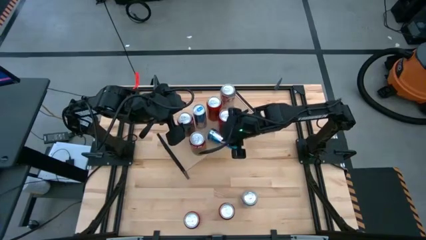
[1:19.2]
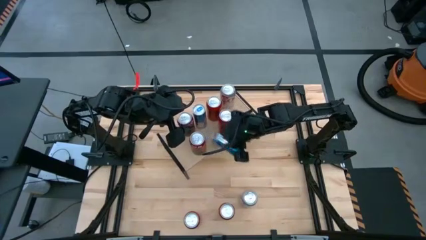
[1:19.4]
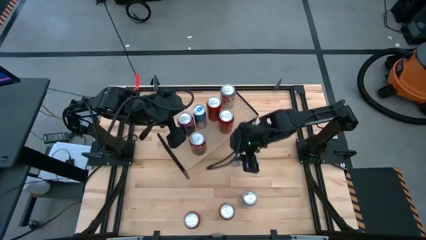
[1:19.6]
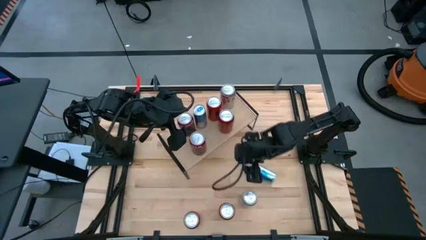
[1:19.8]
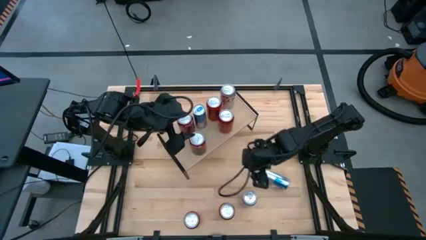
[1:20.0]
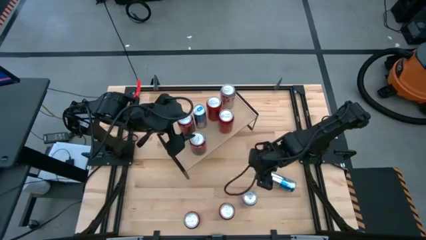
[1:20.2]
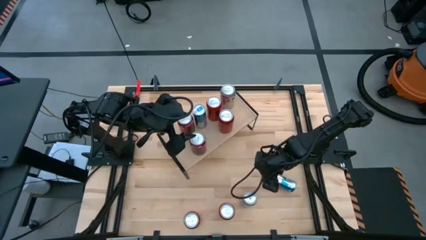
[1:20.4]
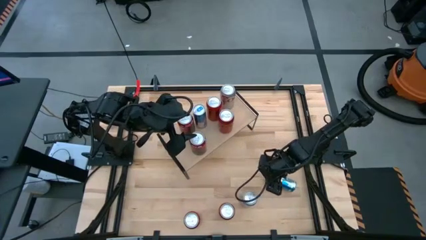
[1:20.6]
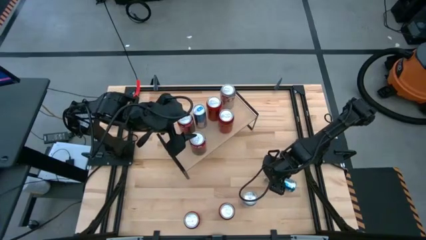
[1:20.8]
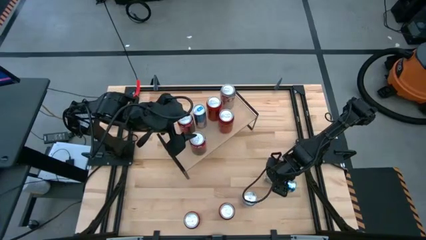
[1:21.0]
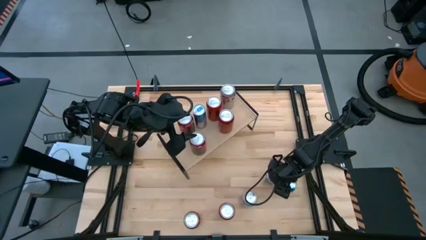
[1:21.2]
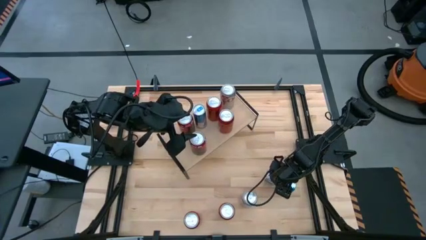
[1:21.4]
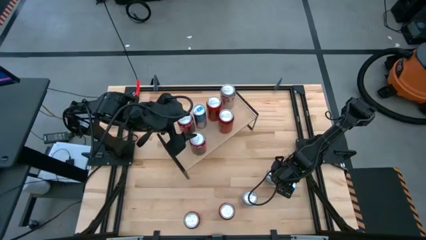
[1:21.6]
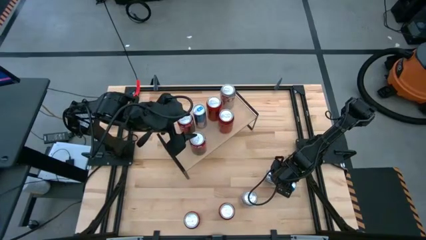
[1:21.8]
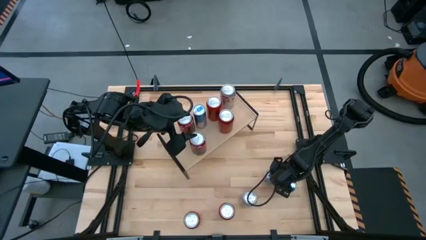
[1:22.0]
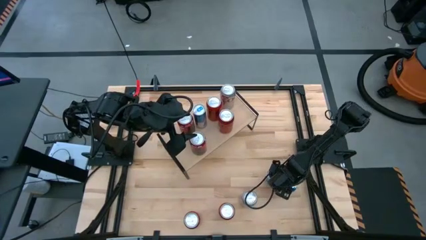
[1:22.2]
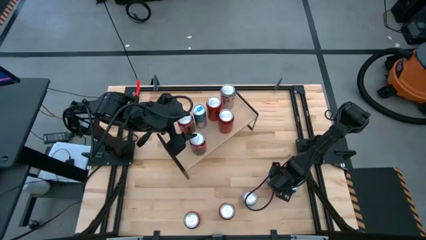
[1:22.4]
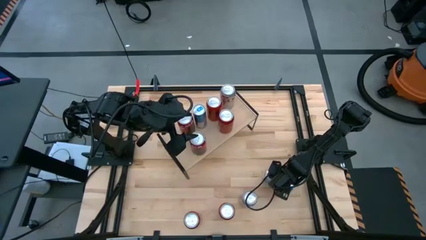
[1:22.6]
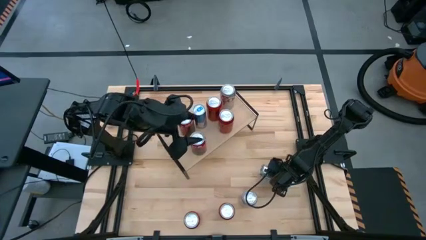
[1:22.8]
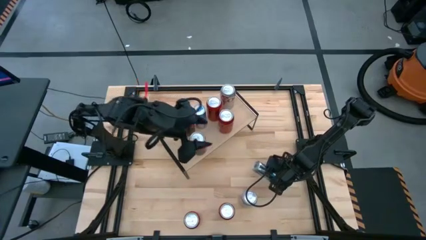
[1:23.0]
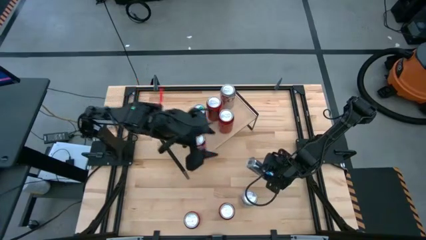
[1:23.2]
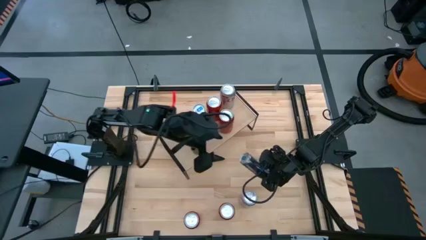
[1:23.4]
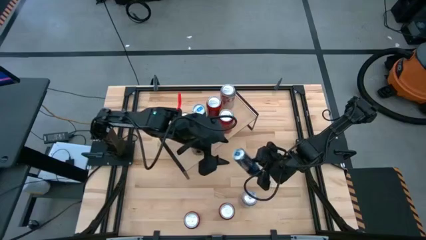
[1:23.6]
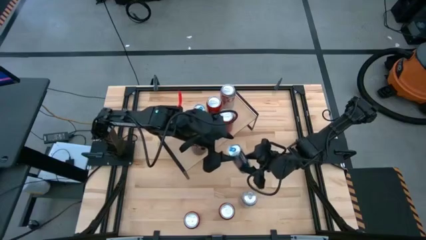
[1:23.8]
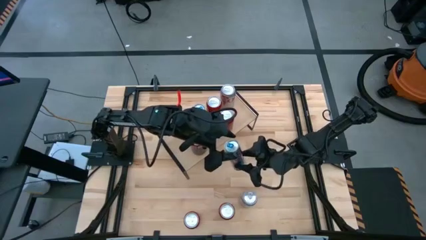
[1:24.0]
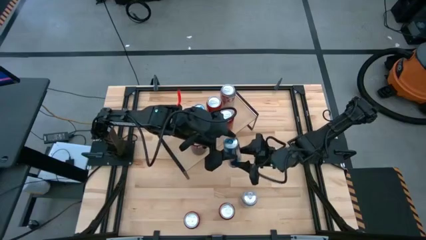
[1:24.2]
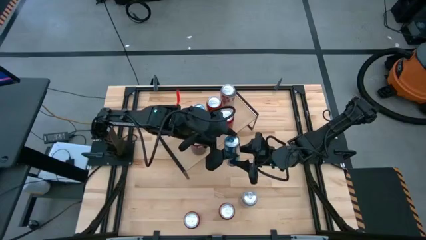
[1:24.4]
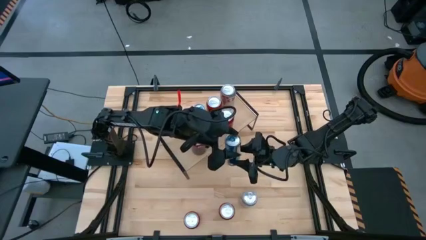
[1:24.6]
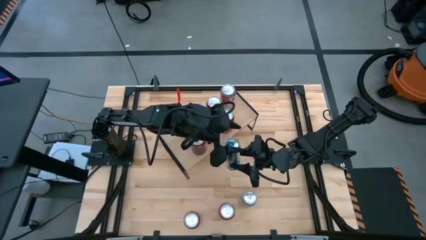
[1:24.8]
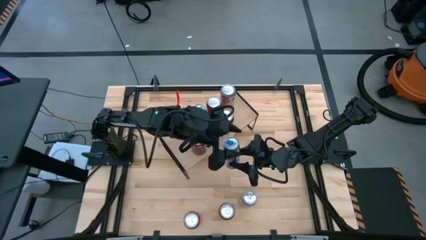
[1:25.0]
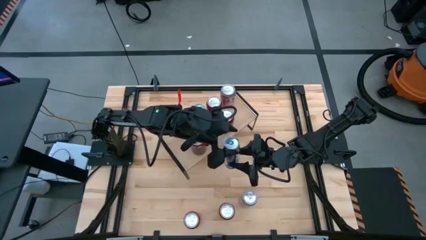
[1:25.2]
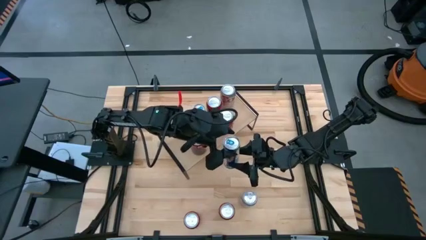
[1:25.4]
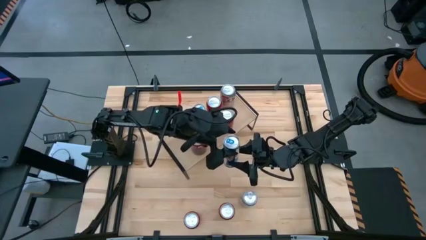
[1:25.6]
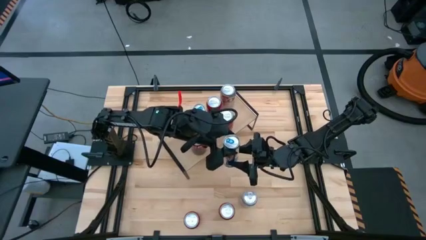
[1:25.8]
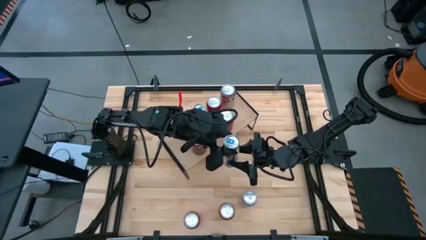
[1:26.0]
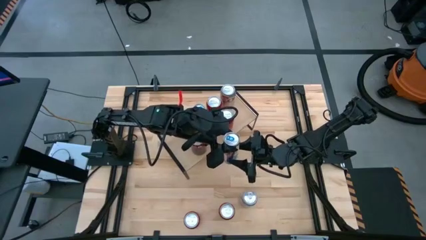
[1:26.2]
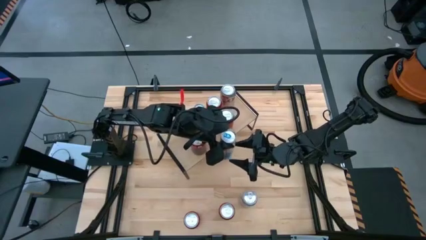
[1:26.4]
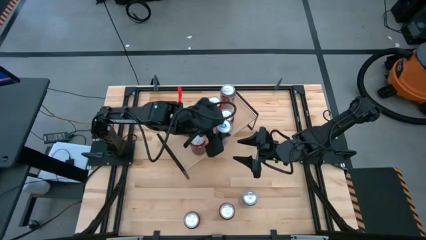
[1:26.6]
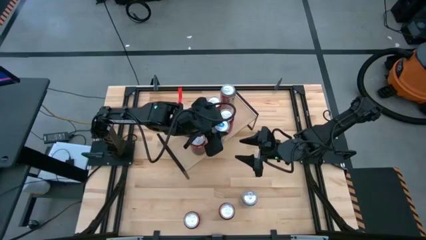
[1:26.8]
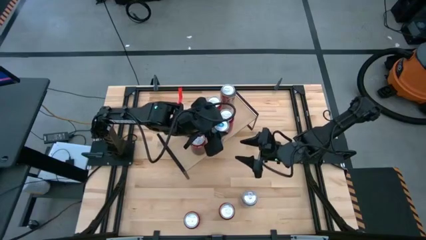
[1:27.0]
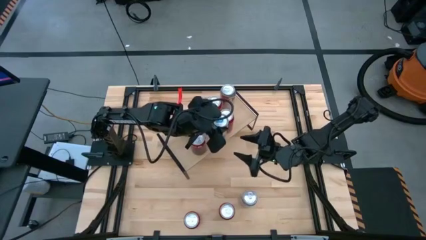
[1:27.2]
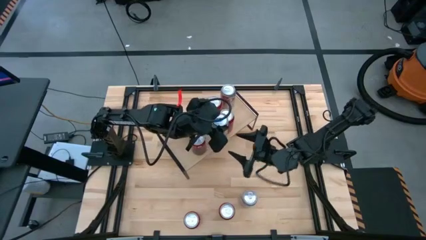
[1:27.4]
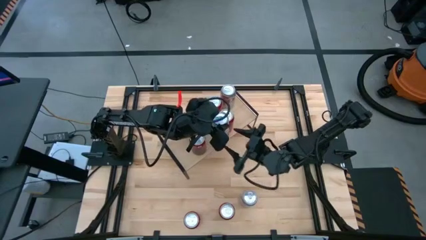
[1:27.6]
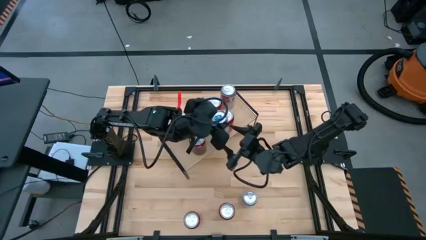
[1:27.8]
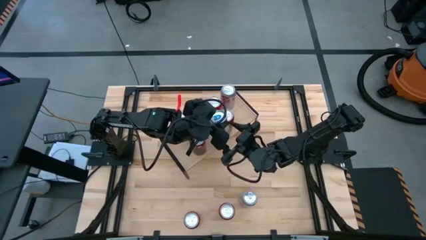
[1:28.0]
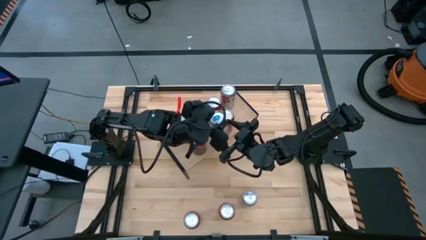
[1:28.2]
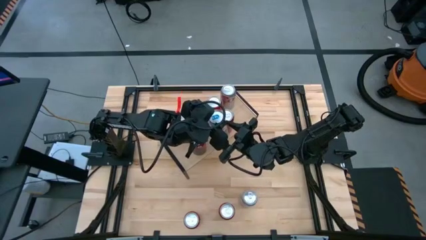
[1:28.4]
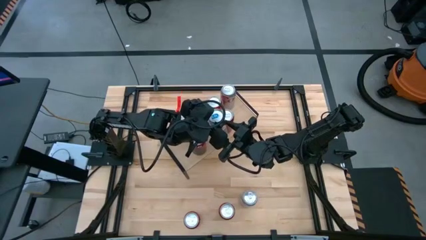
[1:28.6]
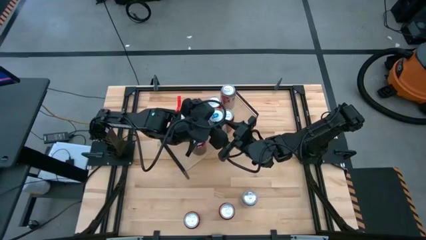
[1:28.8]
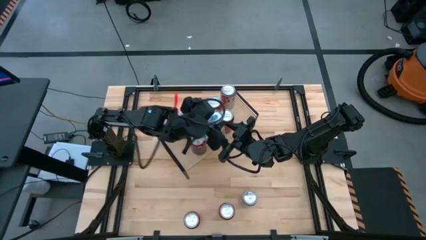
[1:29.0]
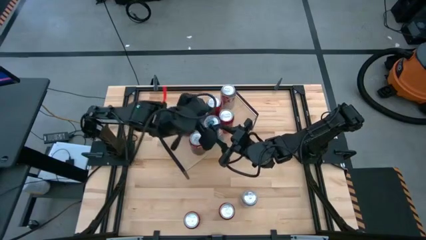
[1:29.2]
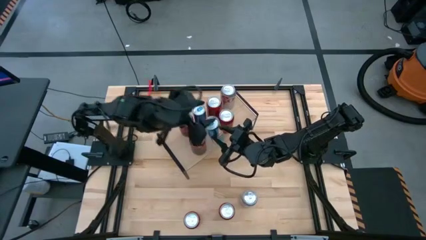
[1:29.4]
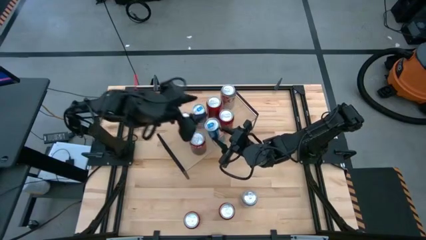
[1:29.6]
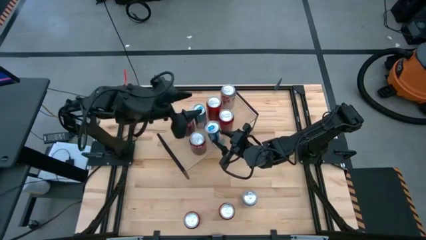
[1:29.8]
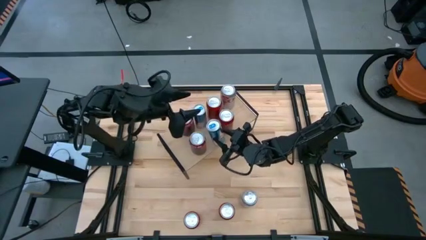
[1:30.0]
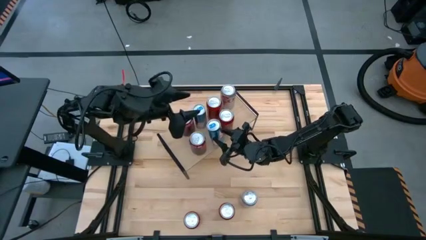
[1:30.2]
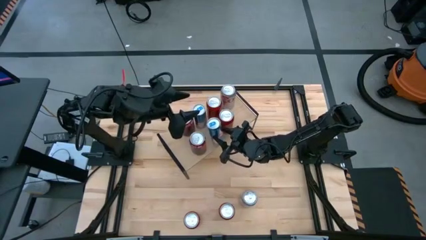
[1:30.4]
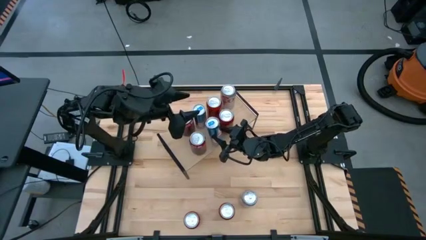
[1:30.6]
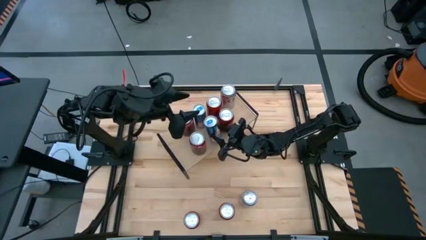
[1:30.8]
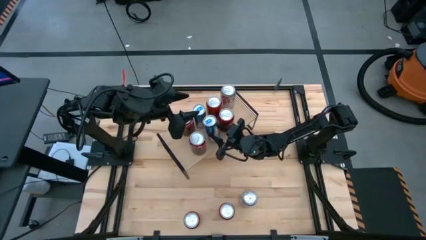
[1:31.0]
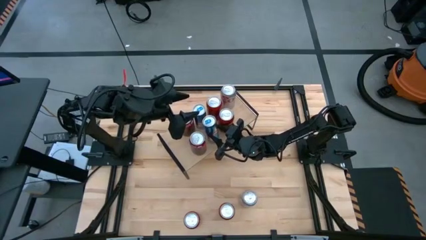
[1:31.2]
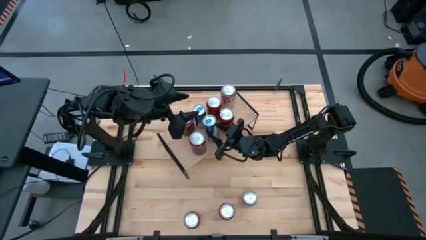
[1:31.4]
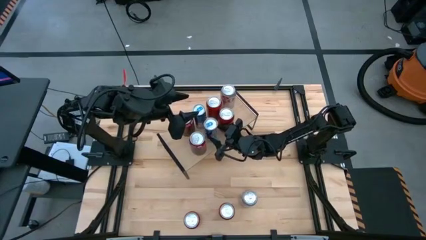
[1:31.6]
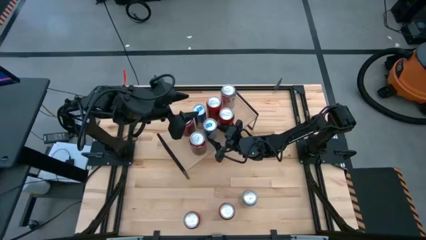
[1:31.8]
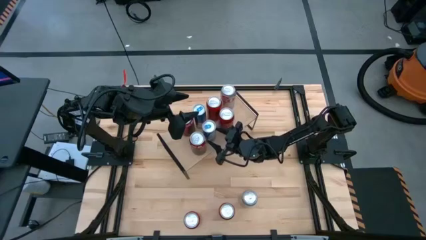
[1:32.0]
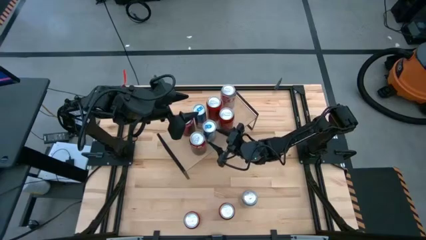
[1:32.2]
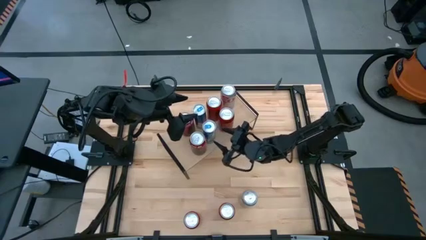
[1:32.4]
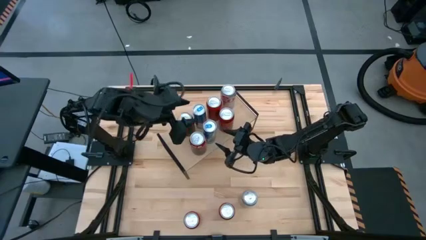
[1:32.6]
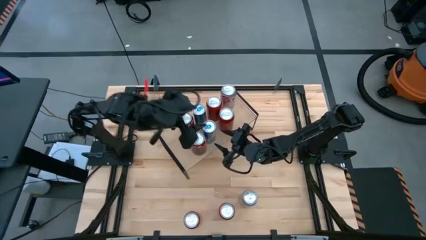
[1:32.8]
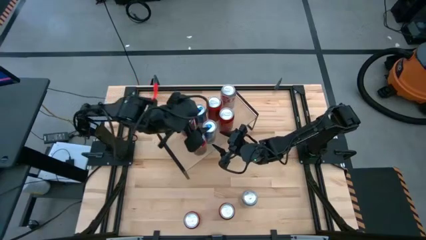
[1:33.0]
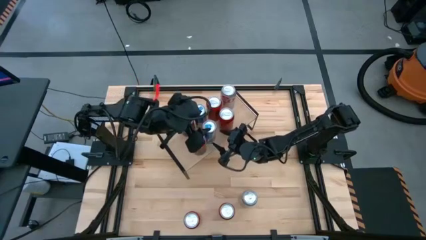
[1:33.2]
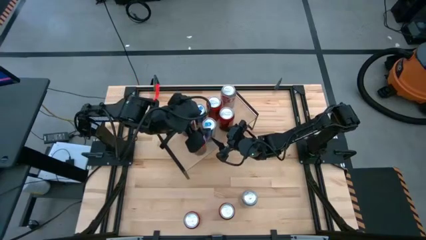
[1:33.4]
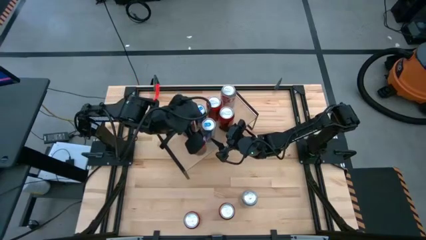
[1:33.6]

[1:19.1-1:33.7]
Task: Place canned beverage on shelf
Put the blue soda can on the shelf aligned with the other blue soda can

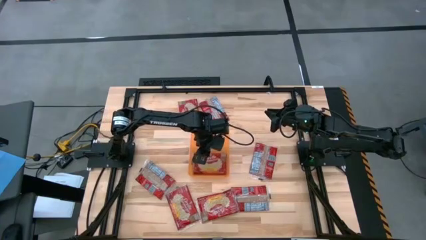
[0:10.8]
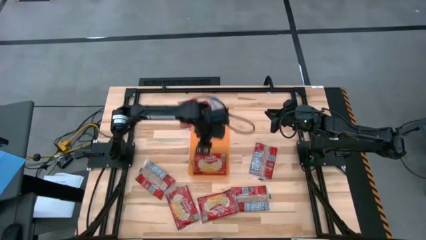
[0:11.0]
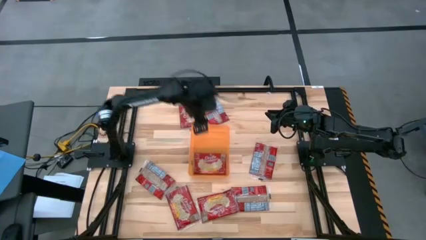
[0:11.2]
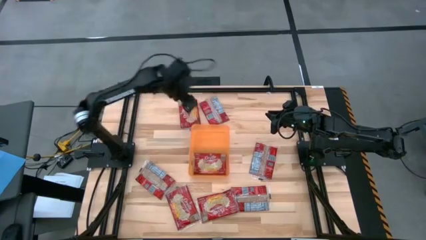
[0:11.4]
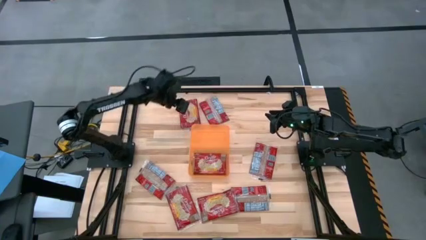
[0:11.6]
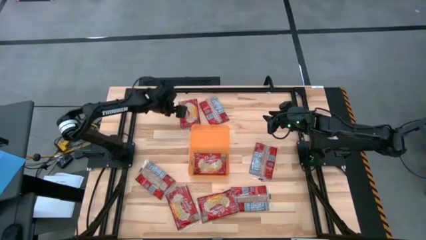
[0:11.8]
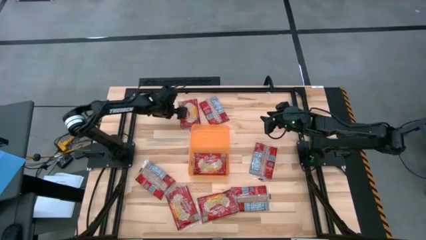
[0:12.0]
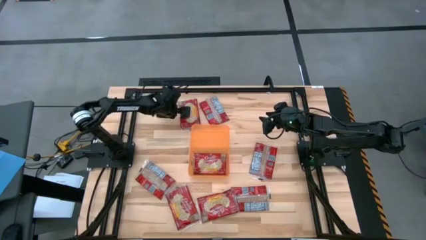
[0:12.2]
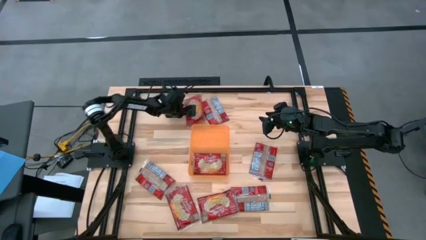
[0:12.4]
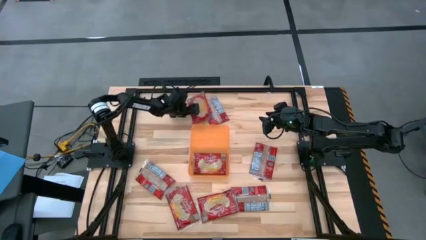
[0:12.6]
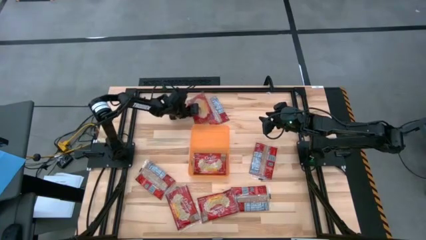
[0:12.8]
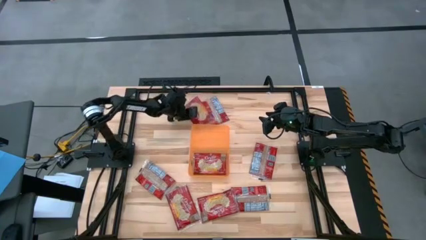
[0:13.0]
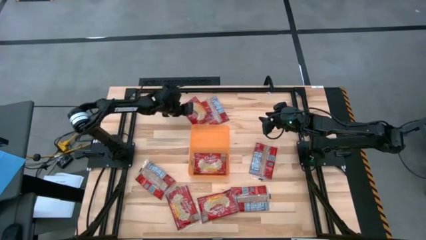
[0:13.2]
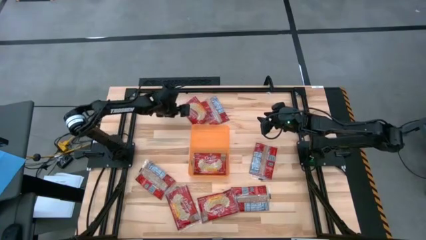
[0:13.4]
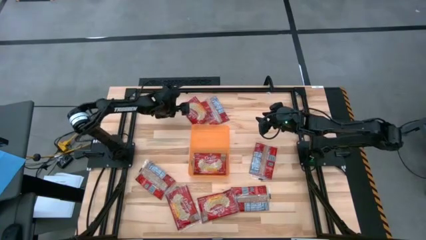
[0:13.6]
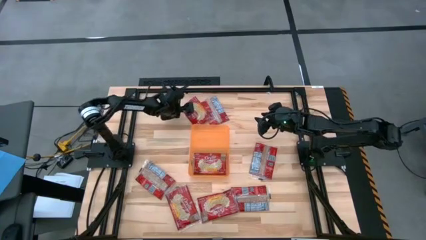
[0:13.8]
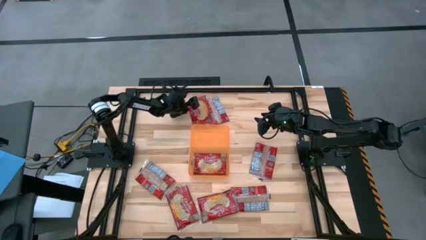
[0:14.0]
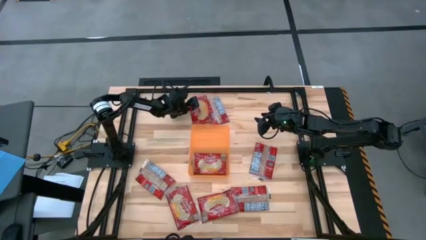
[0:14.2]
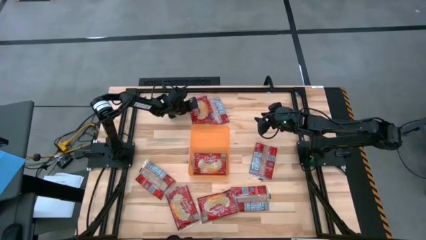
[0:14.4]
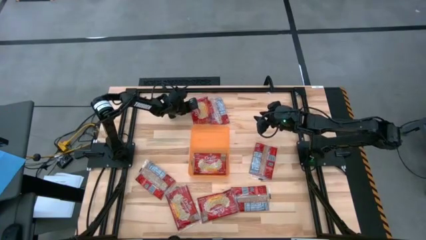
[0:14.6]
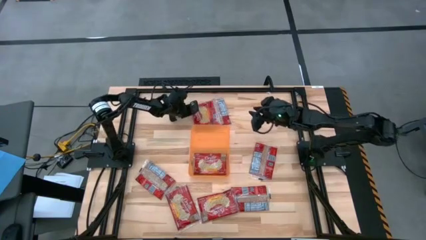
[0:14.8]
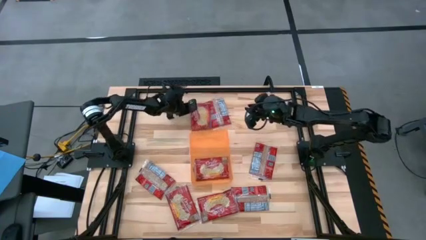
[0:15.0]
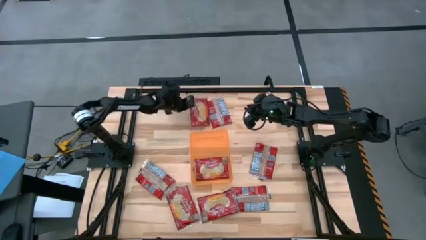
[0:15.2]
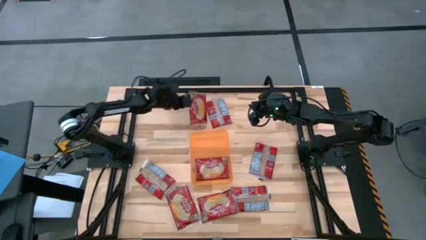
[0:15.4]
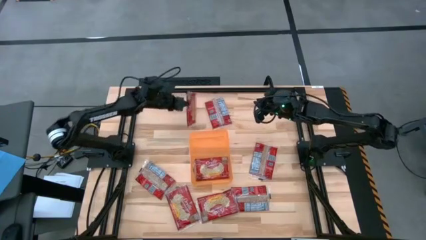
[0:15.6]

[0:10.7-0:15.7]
Task: Sort popcorn bags into baskets
Put the red popcorn bag into the orange bin
